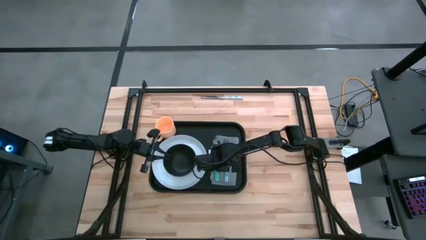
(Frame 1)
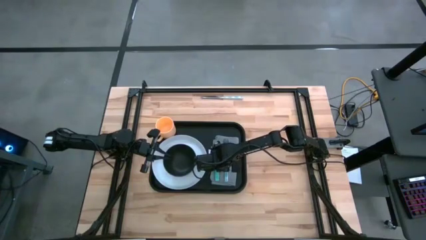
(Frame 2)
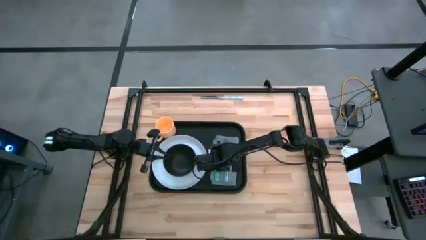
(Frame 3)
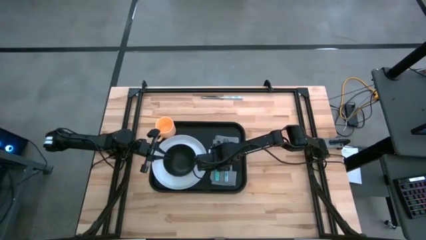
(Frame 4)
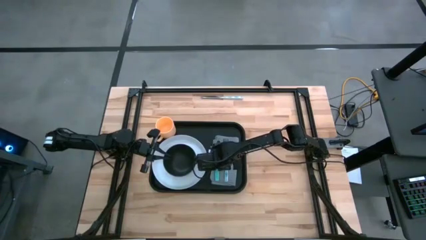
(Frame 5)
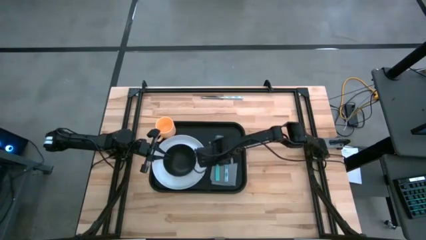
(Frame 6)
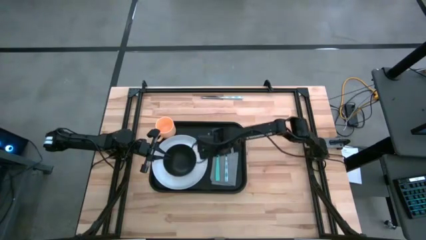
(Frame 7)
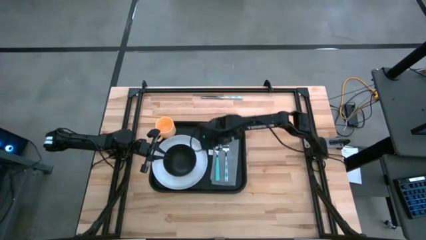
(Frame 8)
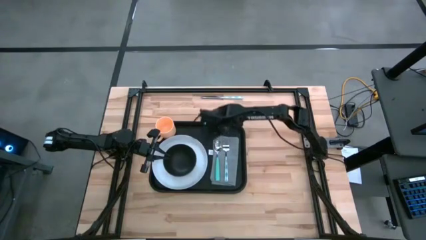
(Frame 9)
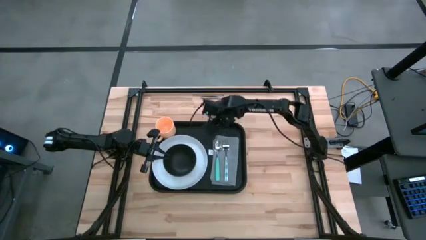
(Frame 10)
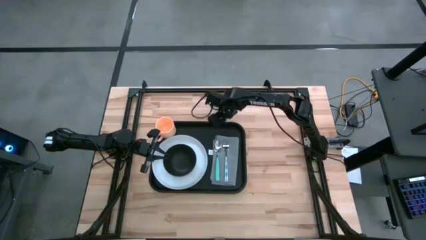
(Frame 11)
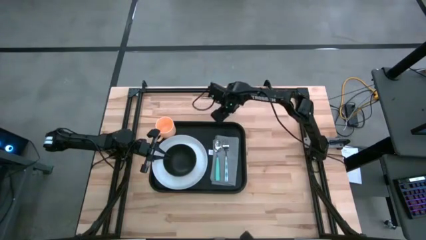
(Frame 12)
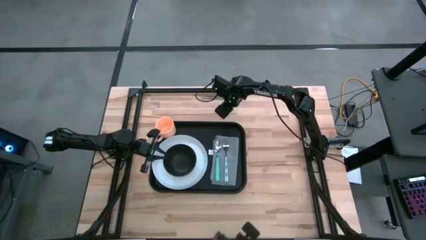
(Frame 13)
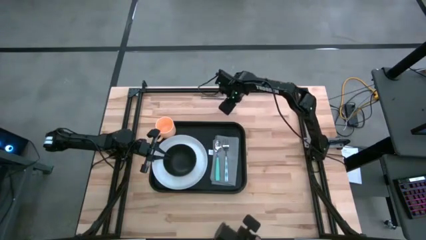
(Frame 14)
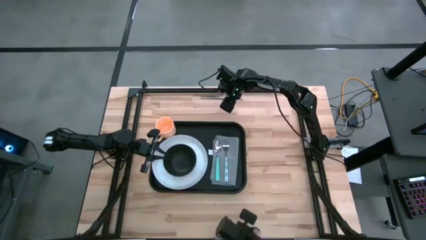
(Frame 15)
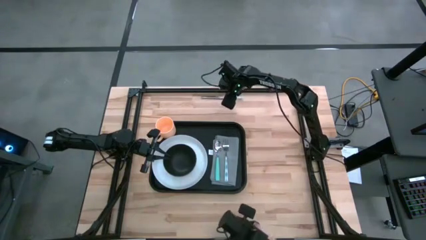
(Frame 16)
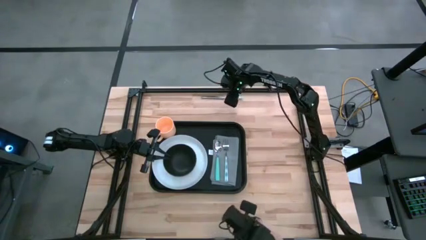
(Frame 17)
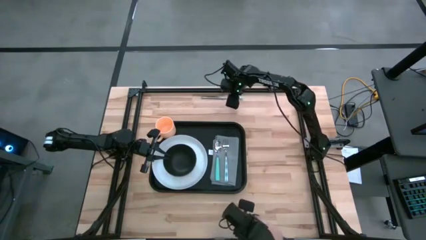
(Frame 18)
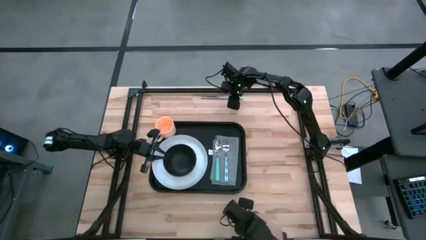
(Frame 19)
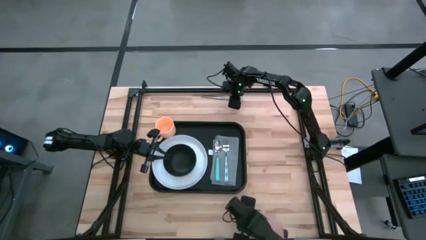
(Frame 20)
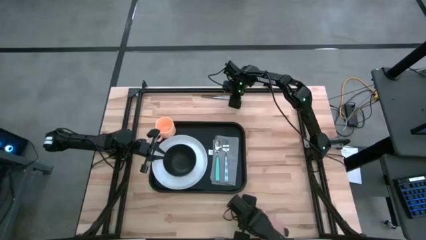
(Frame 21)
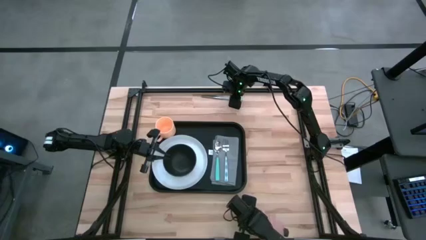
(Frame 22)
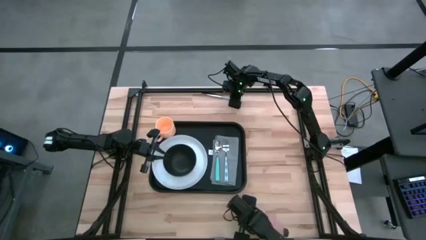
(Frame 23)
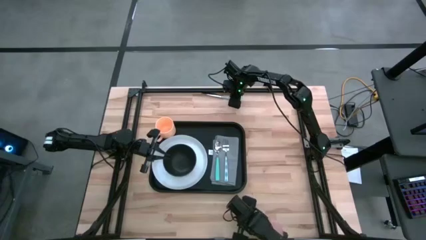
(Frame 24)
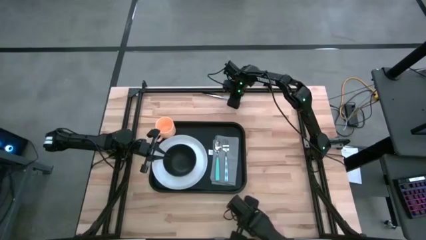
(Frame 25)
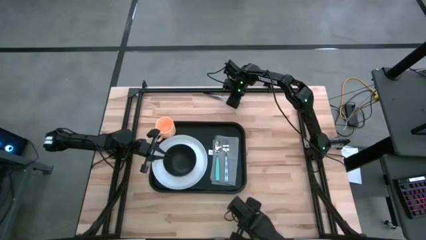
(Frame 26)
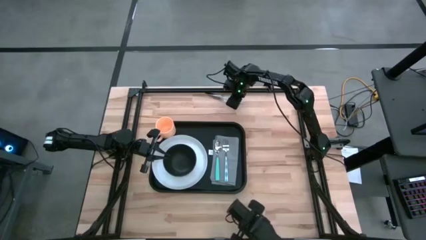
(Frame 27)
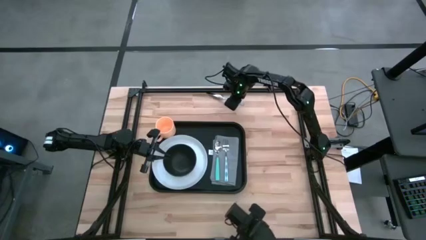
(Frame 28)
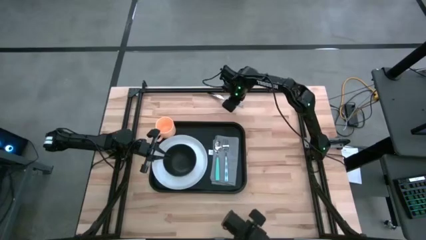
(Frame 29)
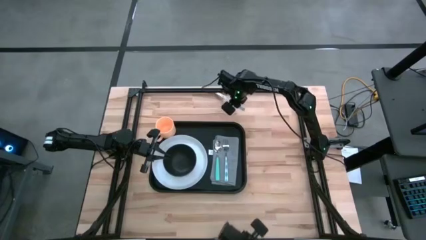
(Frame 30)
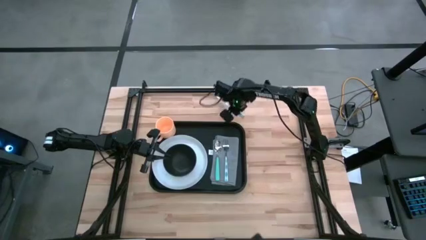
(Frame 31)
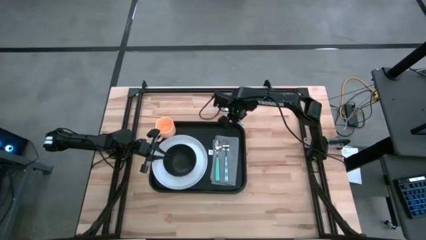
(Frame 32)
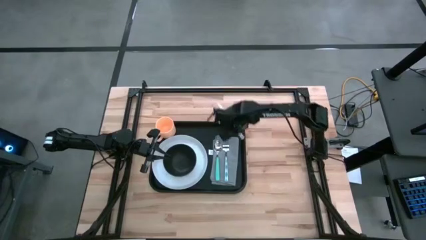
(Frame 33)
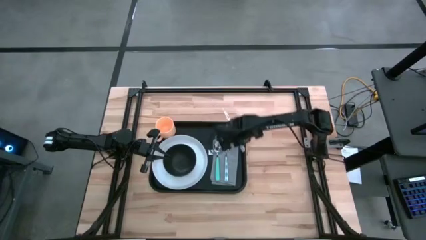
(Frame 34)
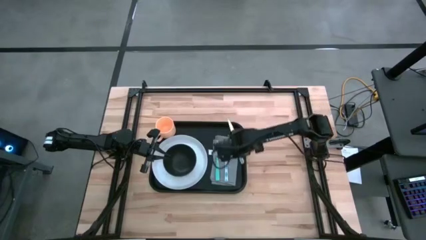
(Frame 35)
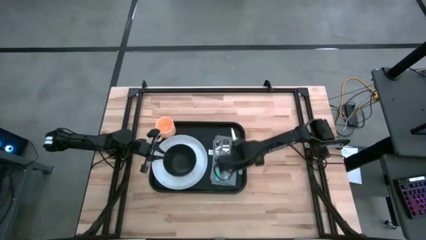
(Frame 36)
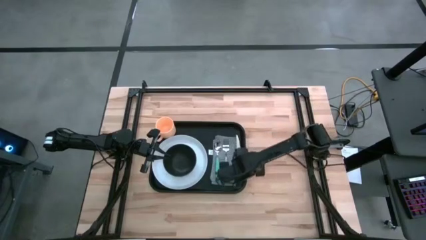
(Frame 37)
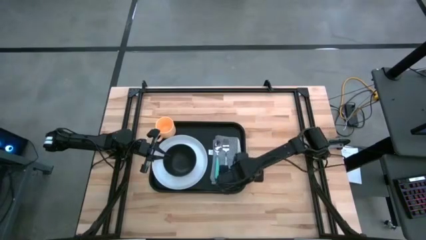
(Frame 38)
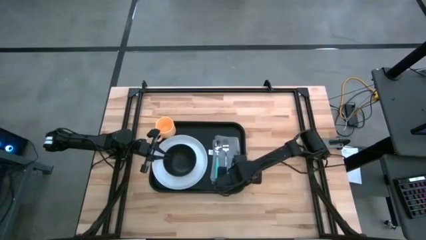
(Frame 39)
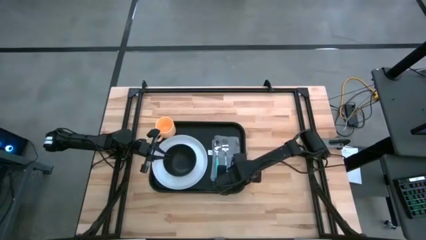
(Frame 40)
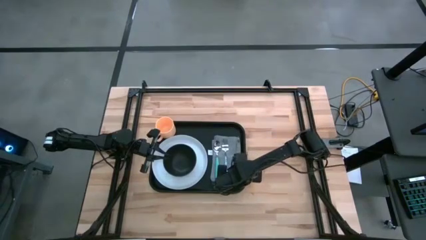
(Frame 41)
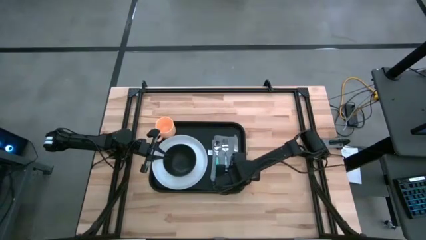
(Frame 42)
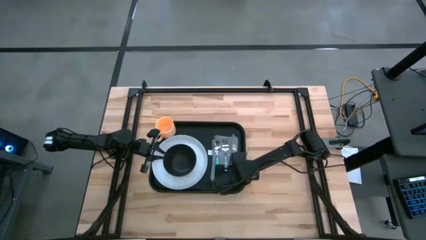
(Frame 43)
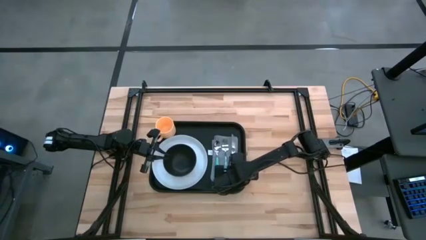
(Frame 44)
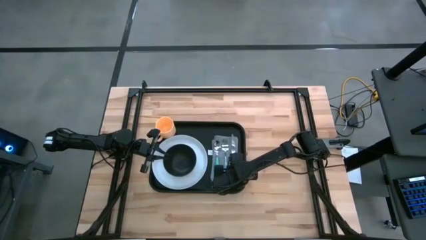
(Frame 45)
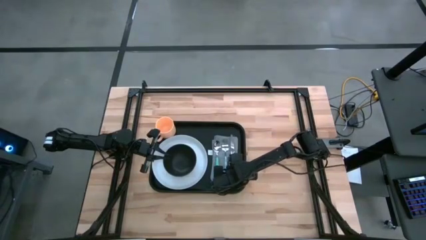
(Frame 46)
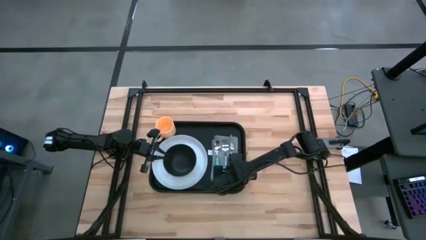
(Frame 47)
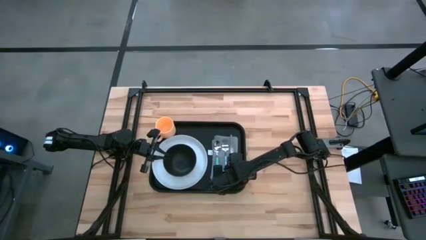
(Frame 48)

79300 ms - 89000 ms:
Task: Set up tray
Put the white knife to the right of the white fork on the gray napkin on the black tray
